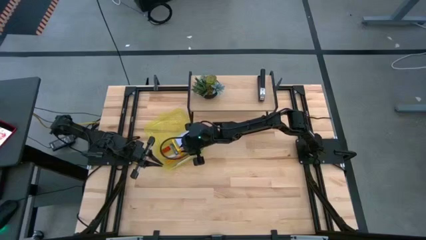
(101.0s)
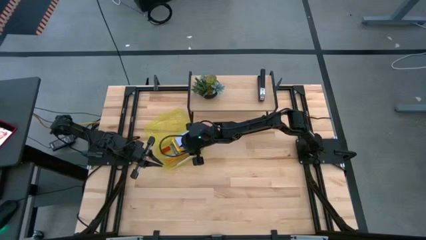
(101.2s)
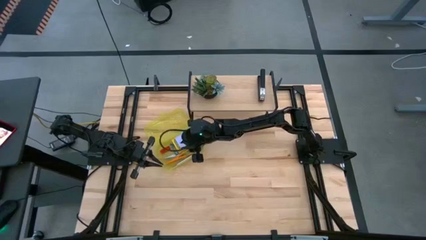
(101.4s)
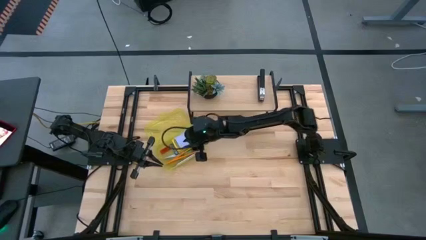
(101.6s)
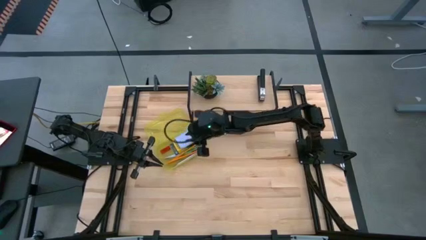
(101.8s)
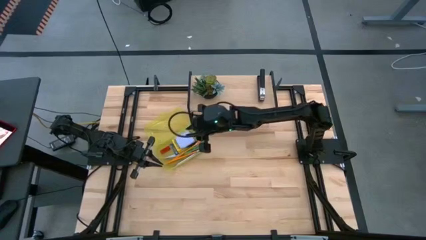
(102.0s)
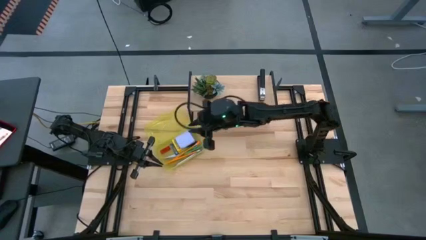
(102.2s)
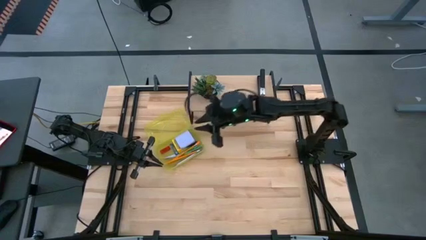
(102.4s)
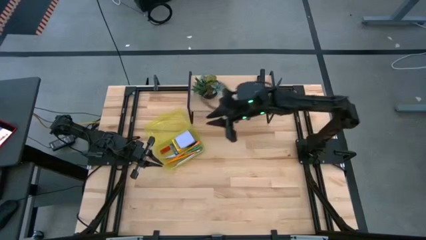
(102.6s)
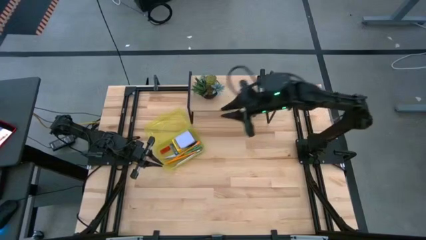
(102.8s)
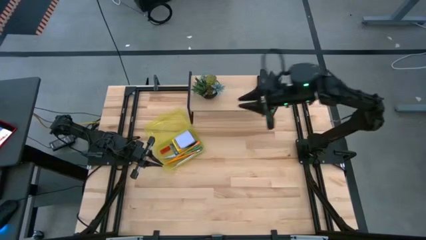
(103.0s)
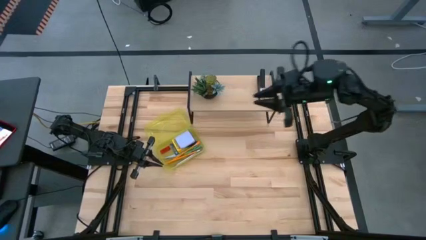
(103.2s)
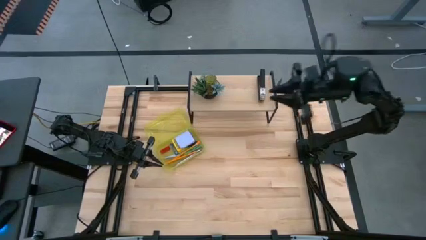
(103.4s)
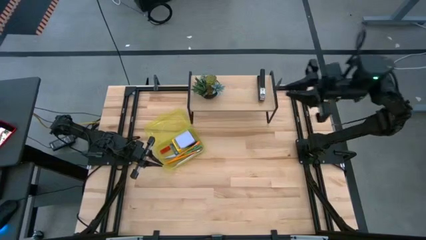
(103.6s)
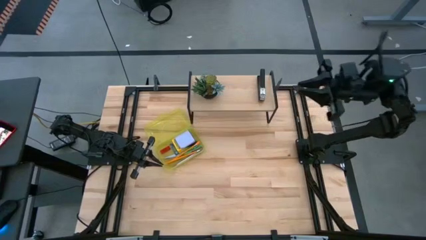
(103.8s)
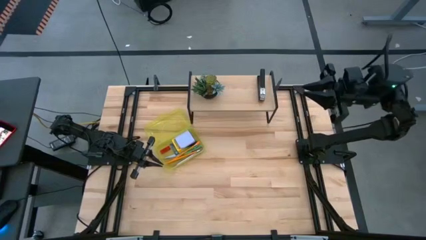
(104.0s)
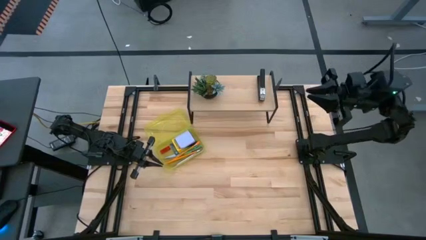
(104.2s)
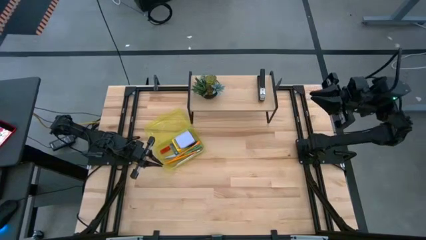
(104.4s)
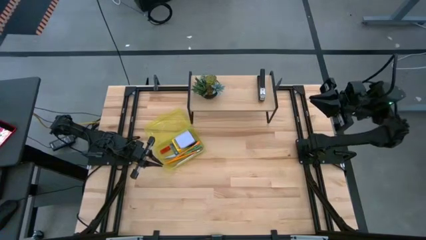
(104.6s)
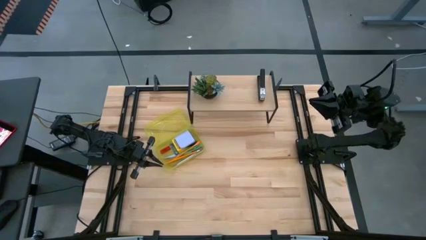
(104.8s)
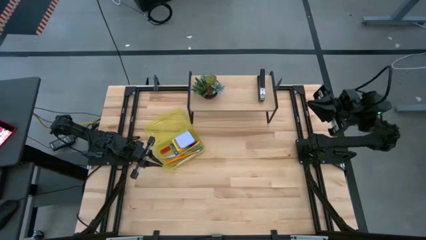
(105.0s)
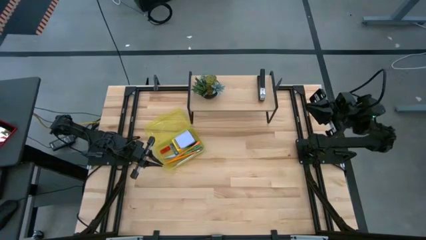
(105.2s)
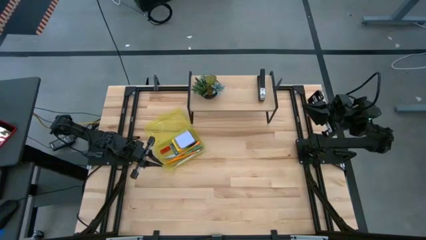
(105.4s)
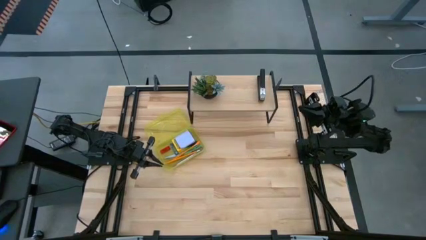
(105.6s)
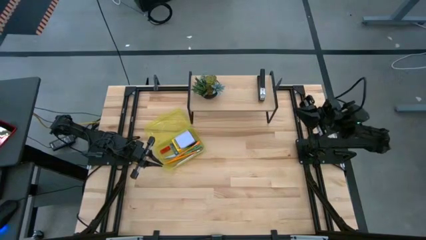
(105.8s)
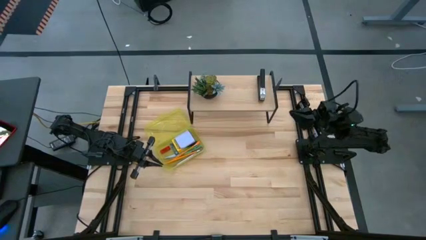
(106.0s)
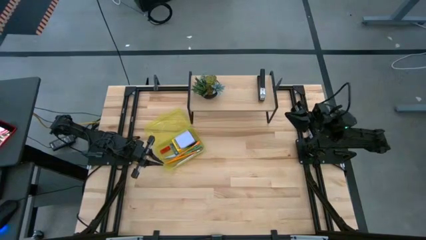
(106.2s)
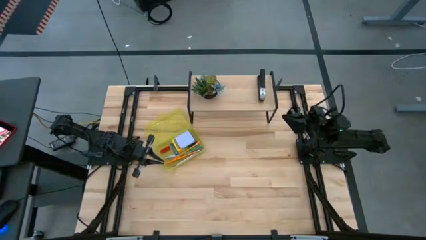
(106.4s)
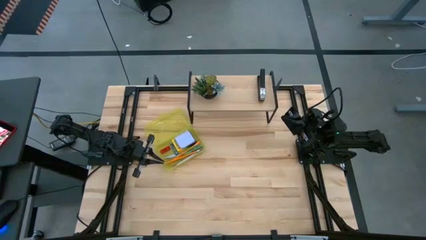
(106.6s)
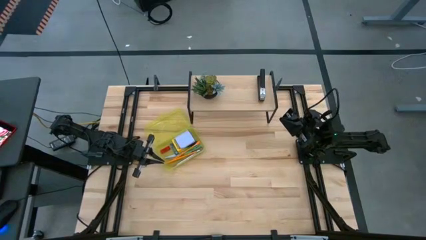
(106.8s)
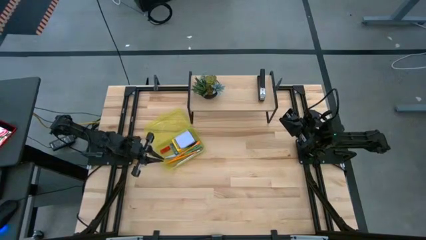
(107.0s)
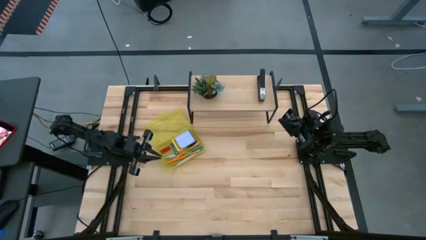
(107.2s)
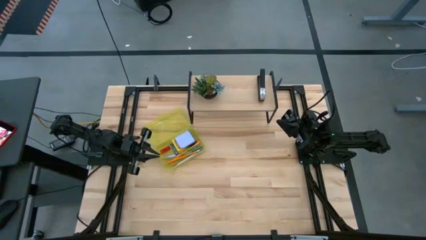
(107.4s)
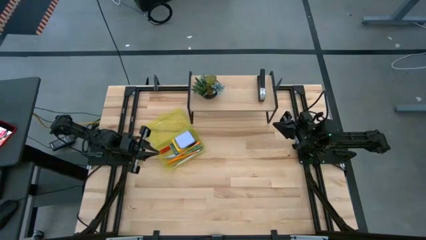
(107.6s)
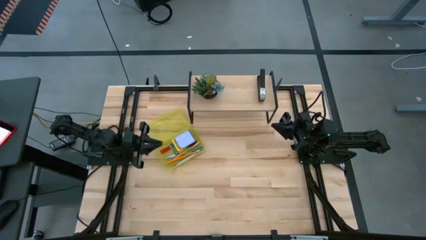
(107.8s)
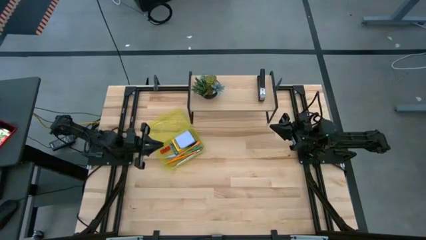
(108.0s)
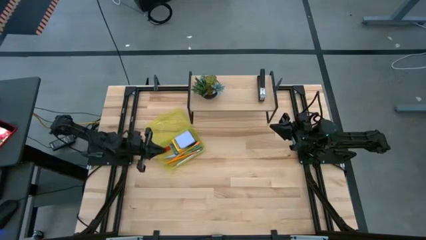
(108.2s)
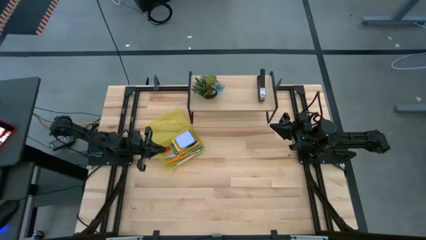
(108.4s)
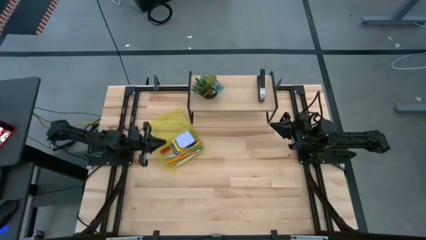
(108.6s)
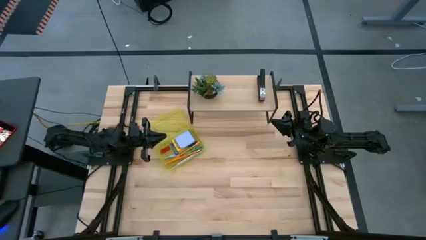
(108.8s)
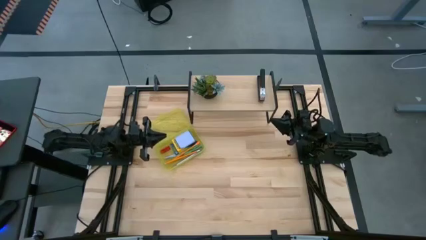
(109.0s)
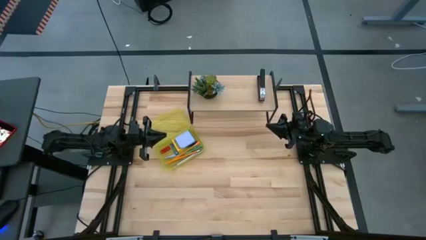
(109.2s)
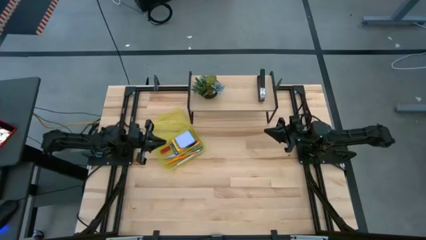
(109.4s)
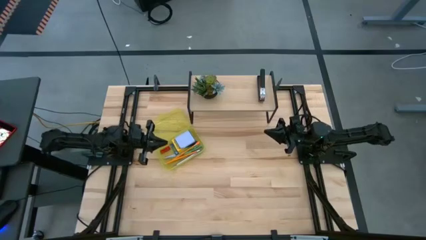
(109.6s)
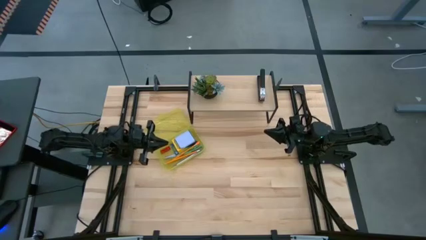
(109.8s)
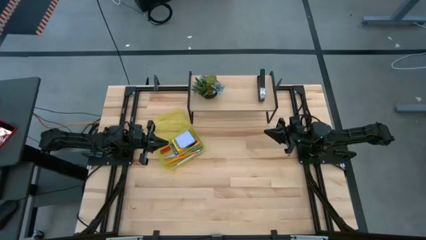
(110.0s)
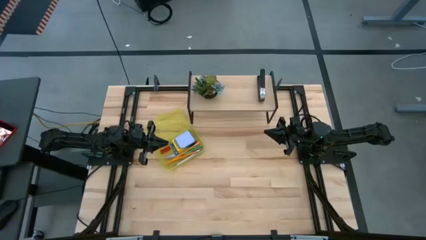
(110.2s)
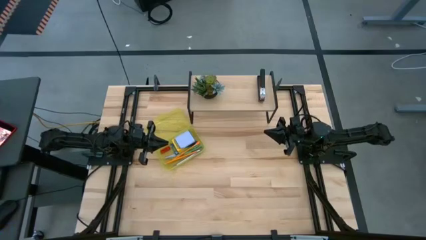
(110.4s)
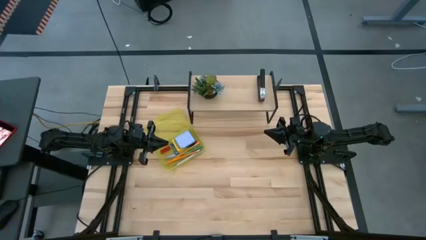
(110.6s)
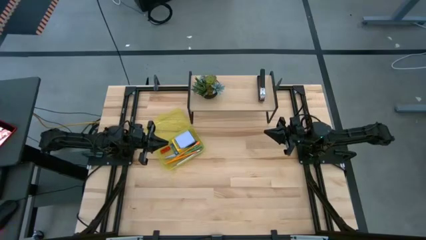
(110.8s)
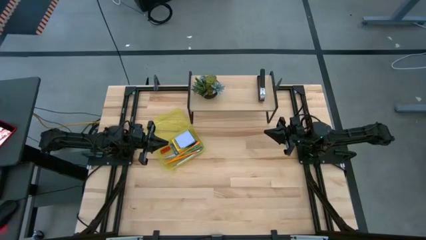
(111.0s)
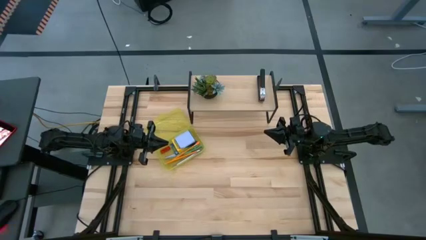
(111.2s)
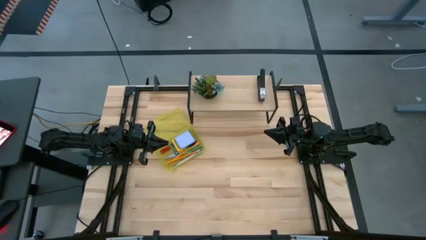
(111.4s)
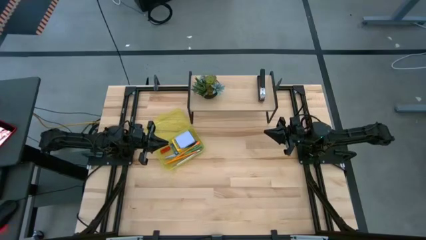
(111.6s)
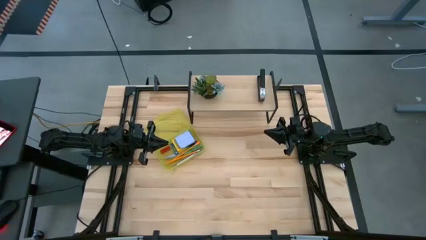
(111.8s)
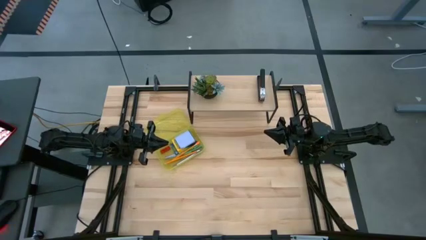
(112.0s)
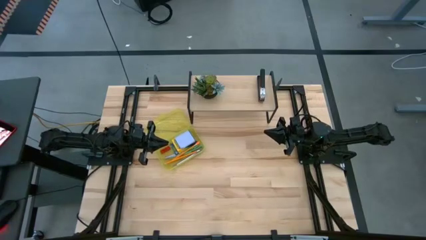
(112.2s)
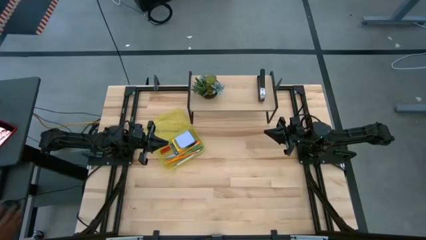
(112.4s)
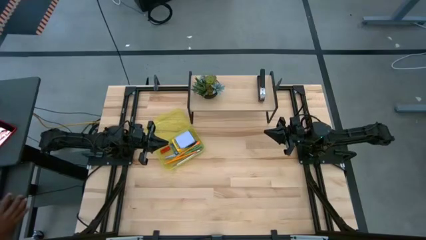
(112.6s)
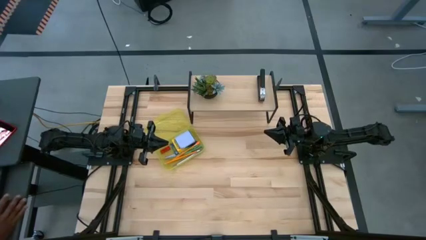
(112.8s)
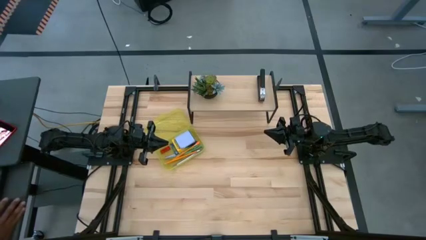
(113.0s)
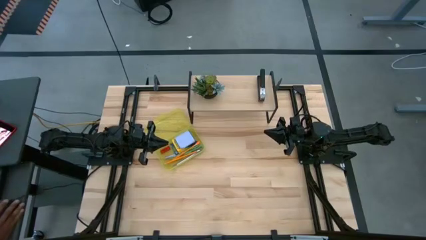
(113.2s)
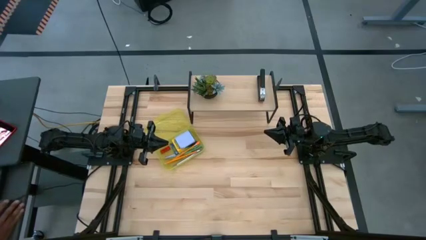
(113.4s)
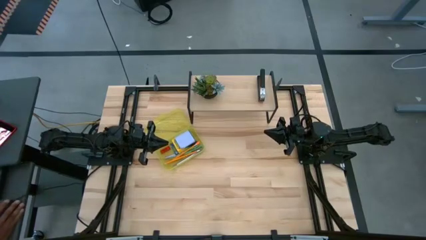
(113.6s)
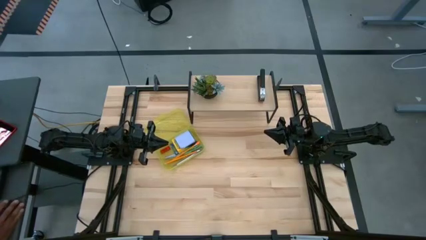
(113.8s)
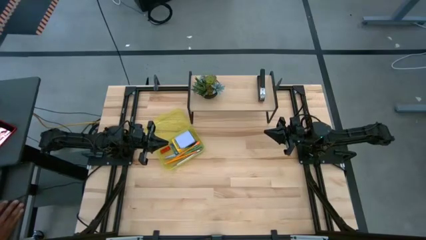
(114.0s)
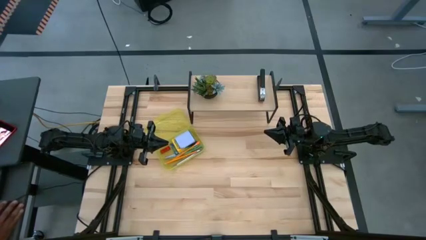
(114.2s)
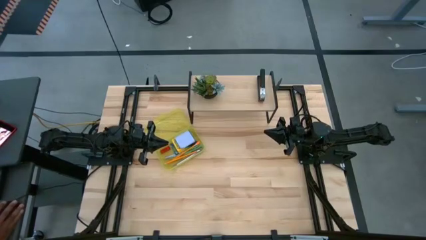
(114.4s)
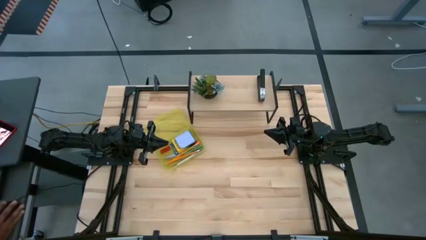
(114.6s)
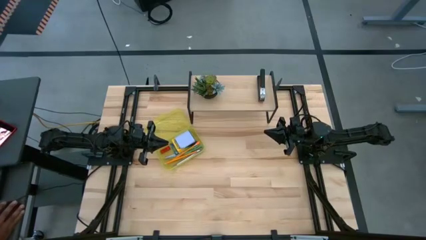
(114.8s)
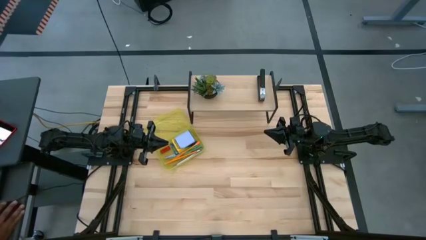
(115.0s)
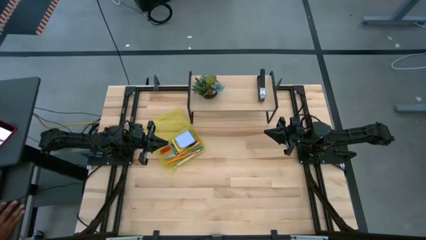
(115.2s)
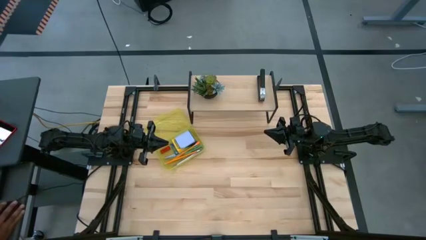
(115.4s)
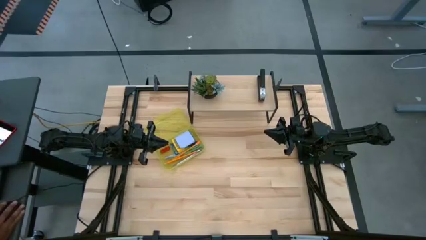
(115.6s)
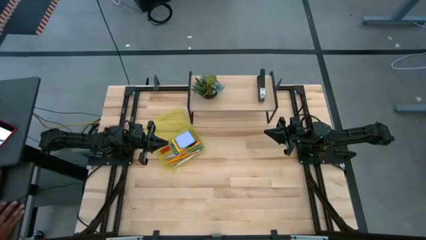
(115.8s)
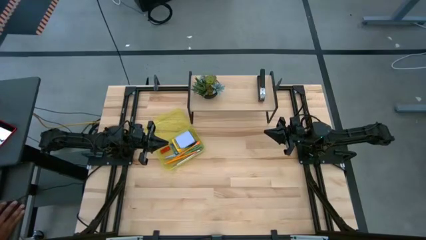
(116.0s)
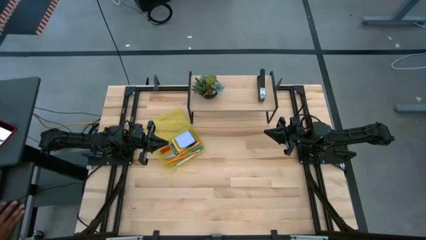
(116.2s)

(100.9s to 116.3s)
Task: Pack school essentials
Return to Home Position

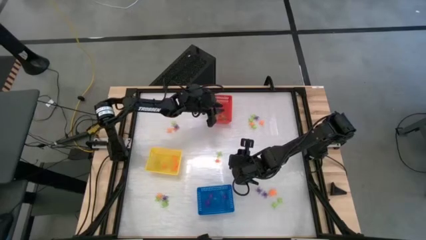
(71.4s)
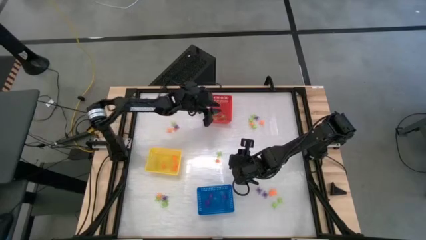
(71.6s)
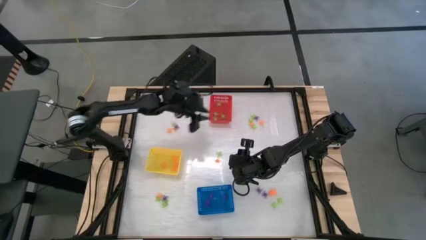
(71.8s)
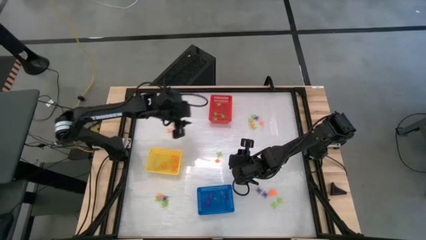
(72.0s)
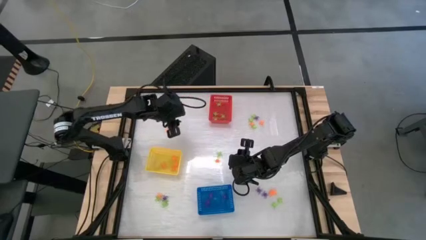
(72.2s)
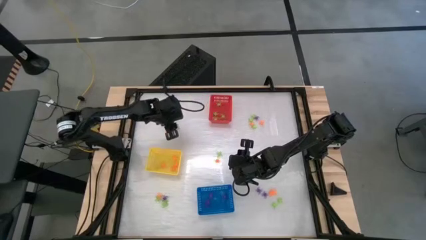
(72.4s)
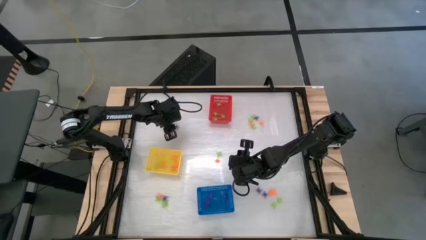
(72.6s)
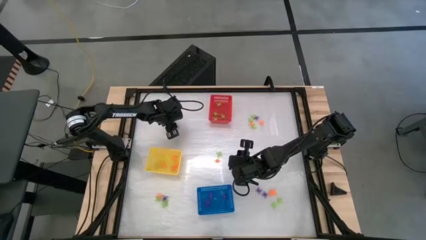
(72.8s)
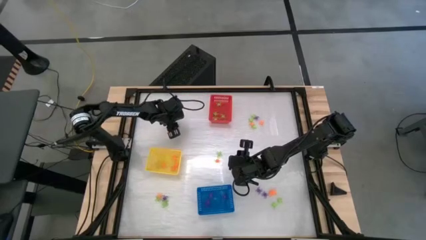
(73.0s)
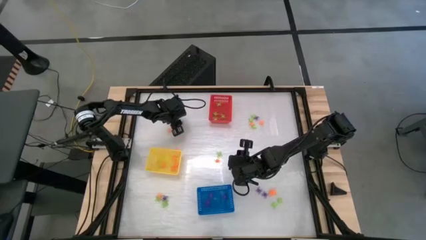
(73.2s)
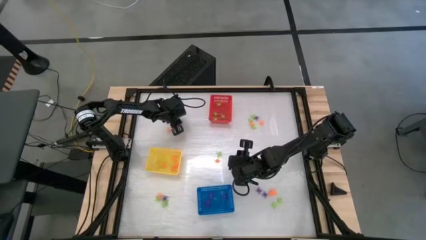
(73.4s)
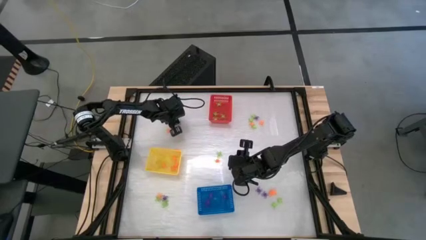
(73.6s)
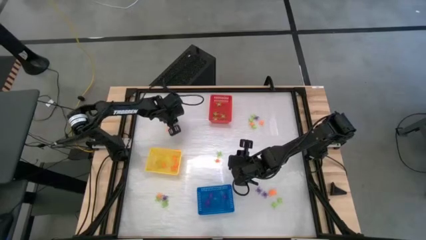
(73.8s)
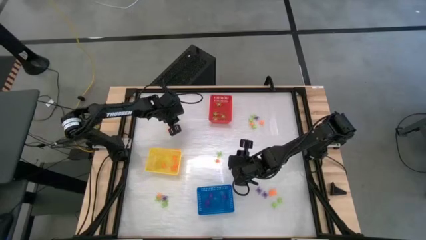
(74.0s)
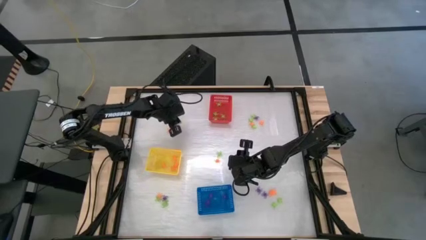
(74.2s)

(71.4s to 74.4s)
Task: Sort Halloween decoration
Put the green spider toy into the red basket
